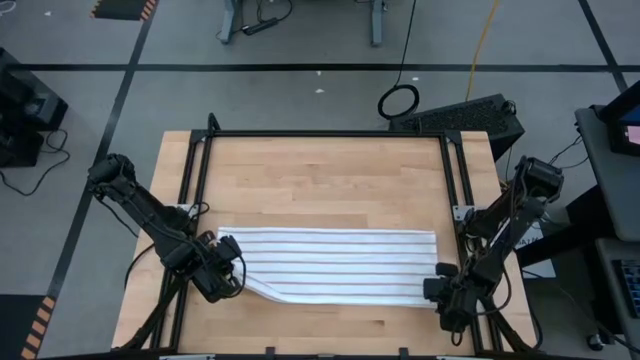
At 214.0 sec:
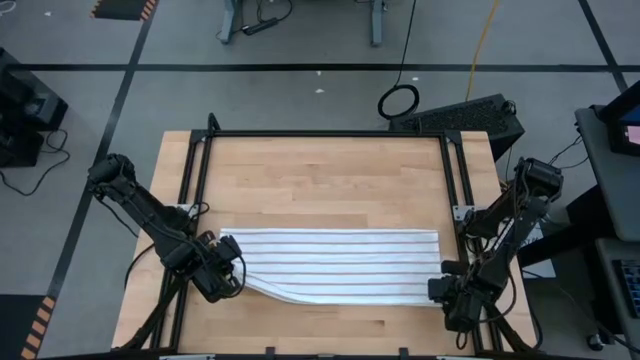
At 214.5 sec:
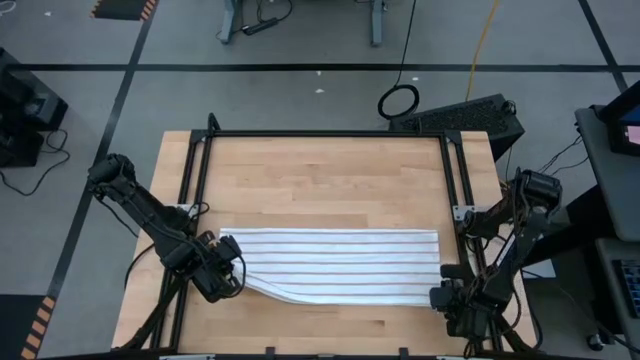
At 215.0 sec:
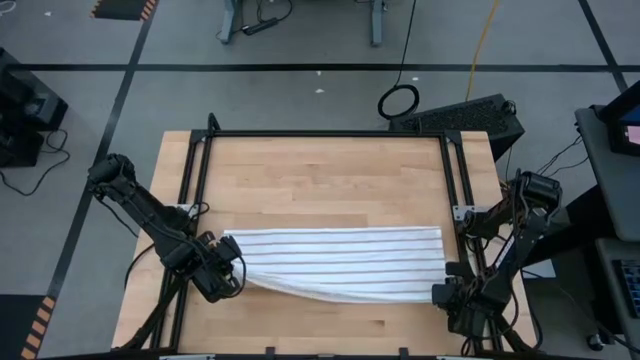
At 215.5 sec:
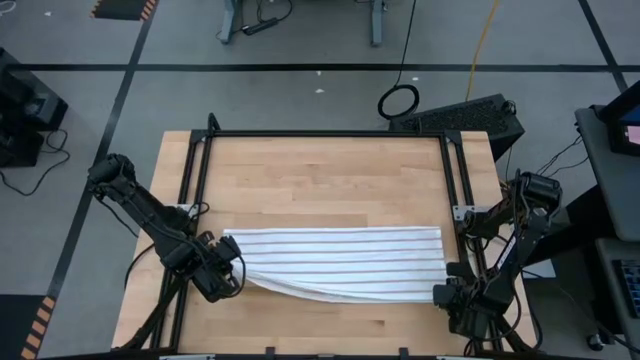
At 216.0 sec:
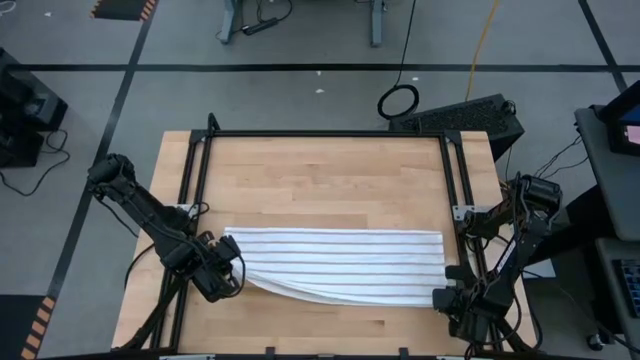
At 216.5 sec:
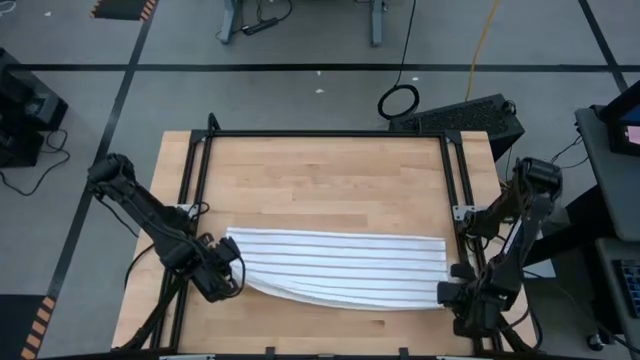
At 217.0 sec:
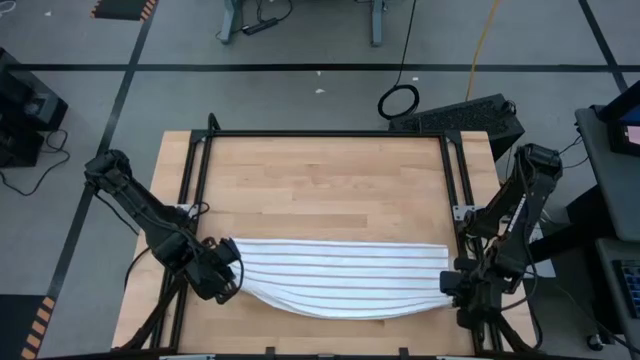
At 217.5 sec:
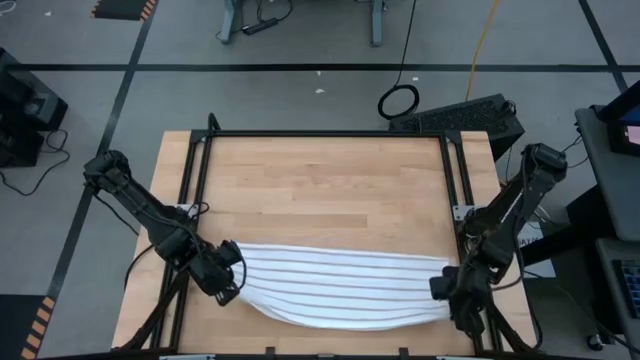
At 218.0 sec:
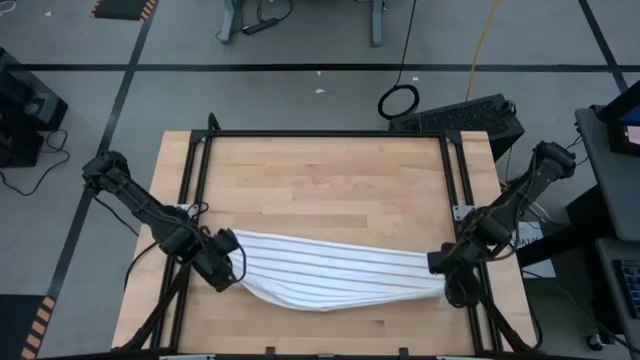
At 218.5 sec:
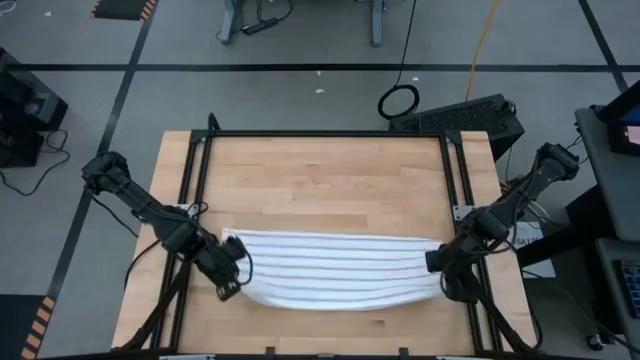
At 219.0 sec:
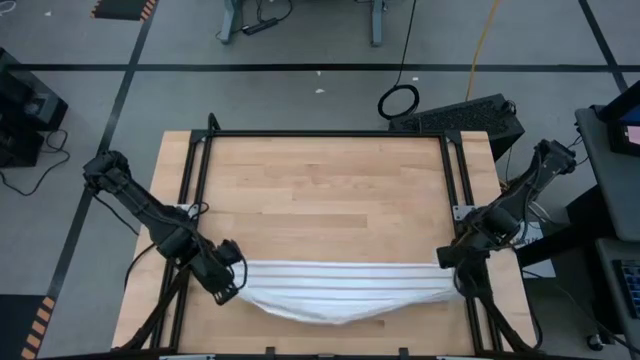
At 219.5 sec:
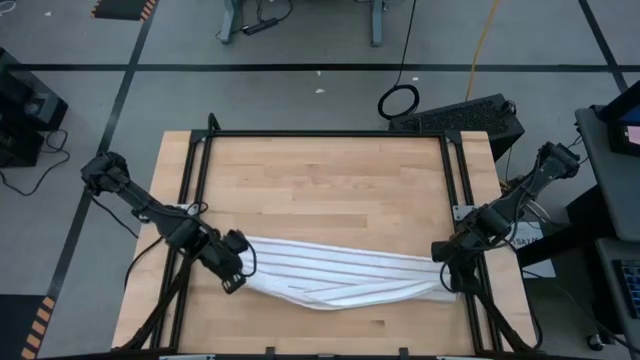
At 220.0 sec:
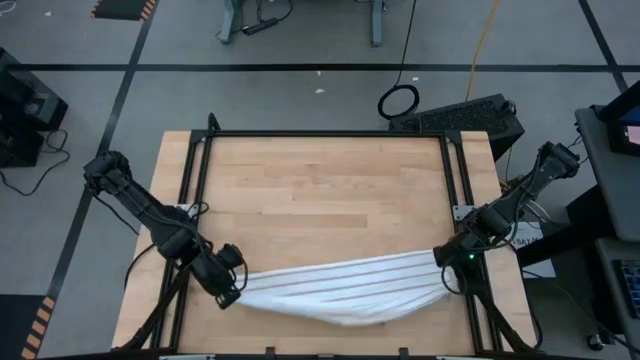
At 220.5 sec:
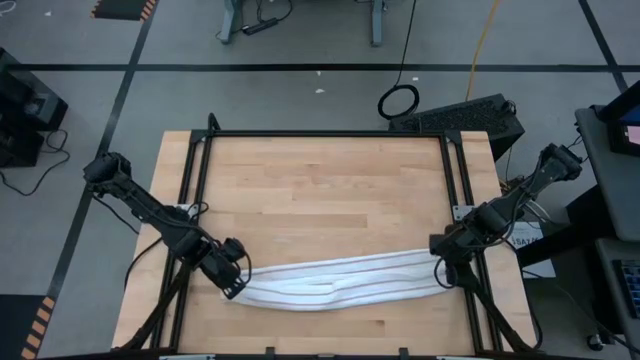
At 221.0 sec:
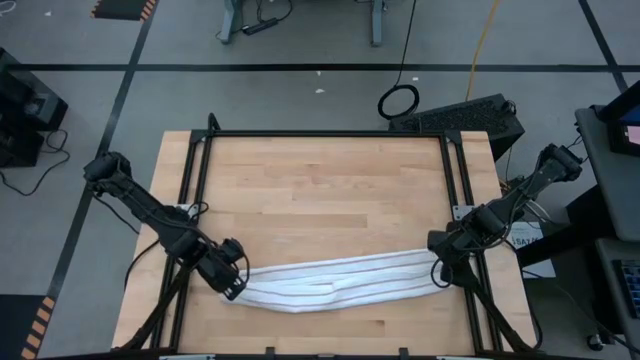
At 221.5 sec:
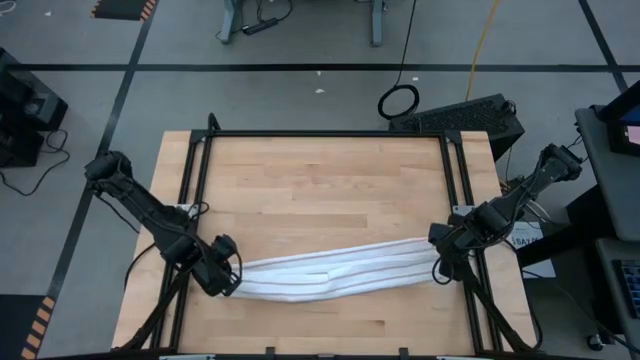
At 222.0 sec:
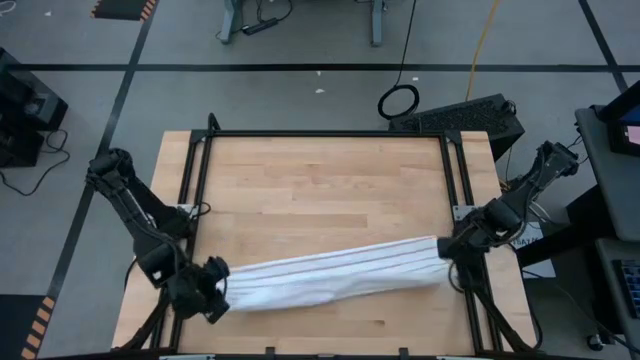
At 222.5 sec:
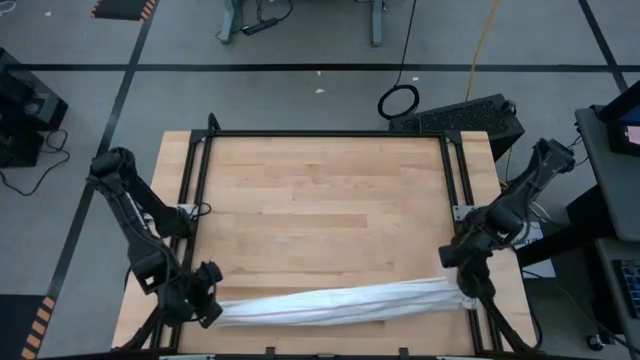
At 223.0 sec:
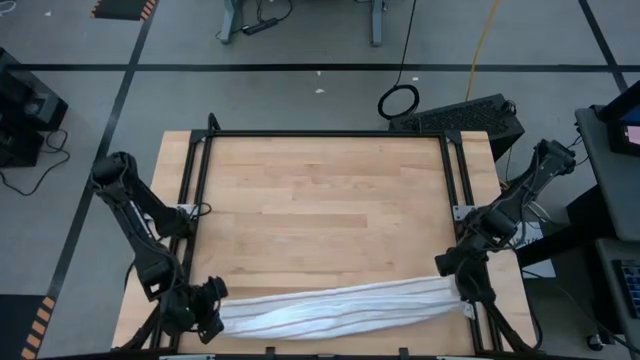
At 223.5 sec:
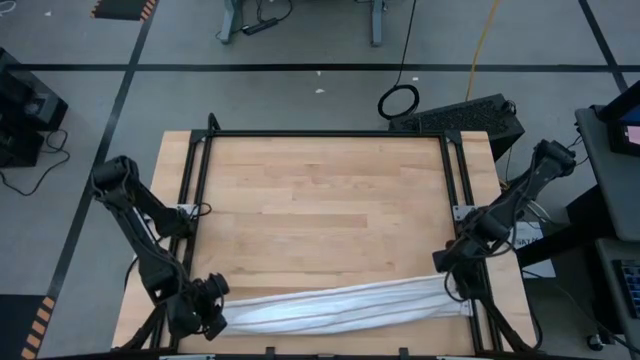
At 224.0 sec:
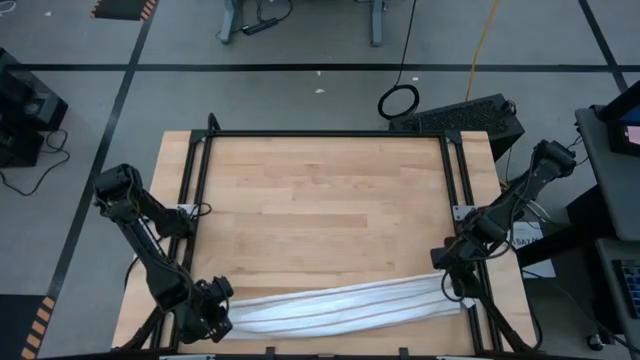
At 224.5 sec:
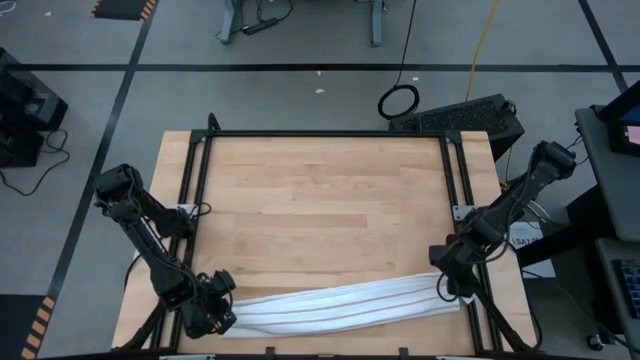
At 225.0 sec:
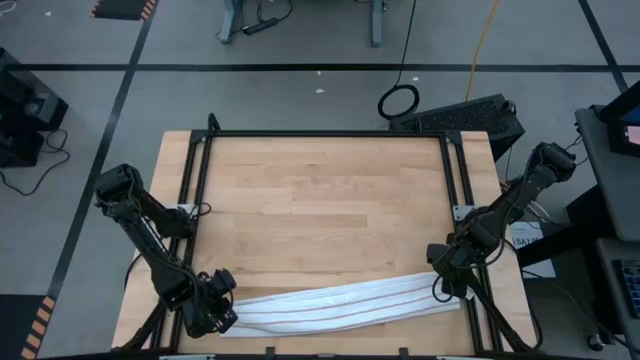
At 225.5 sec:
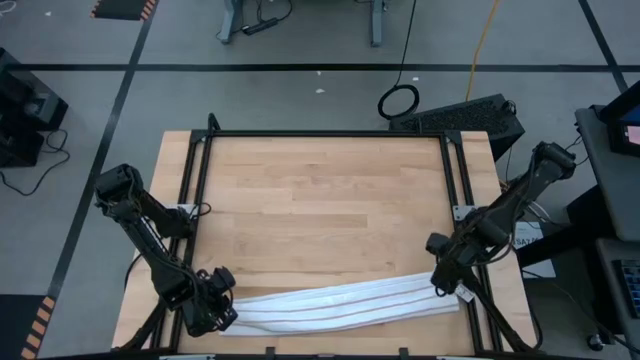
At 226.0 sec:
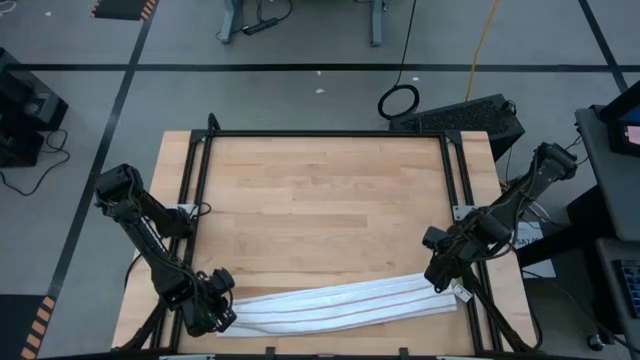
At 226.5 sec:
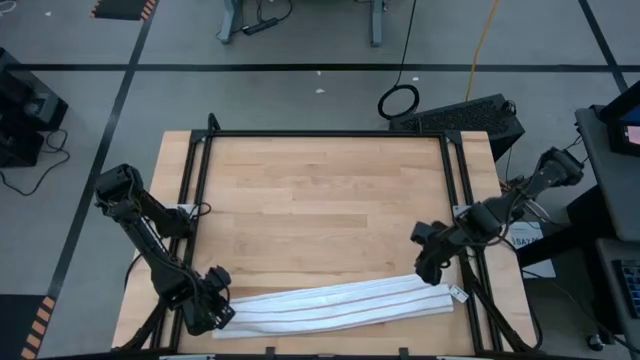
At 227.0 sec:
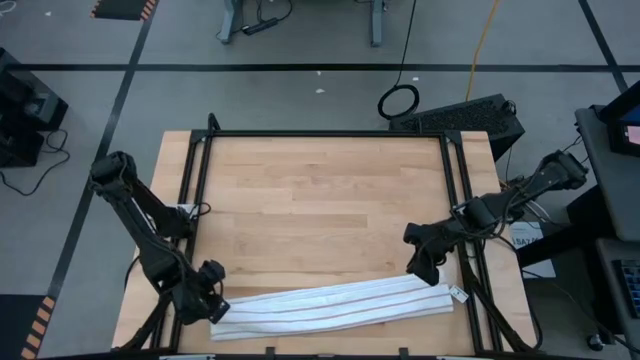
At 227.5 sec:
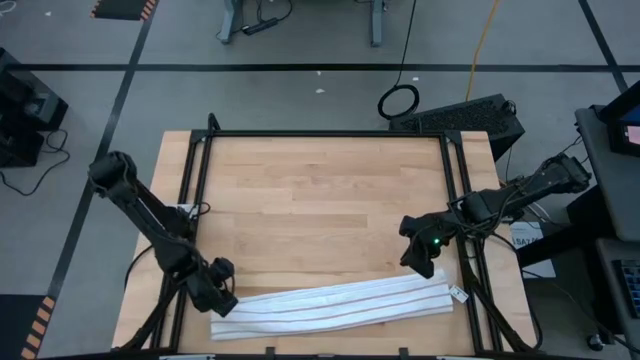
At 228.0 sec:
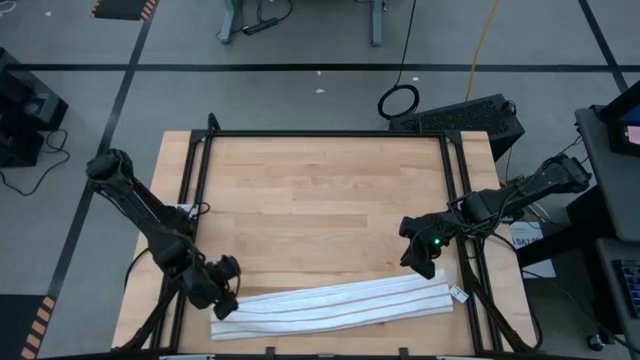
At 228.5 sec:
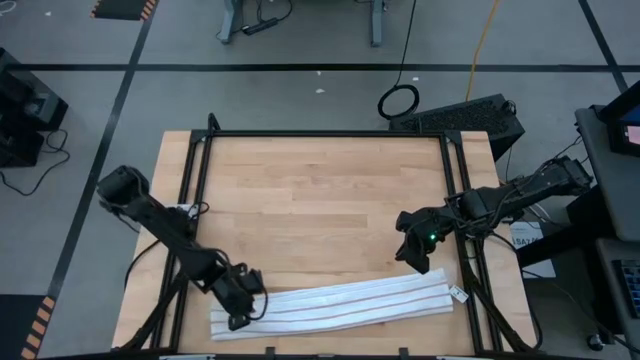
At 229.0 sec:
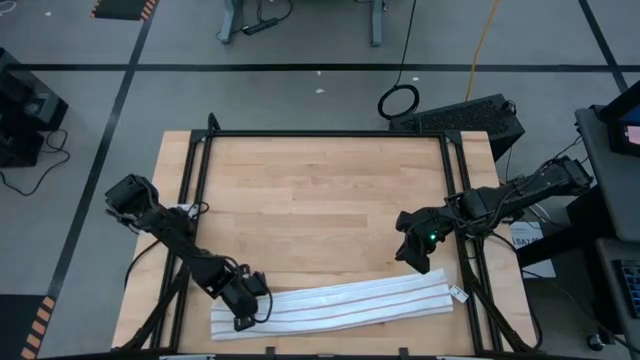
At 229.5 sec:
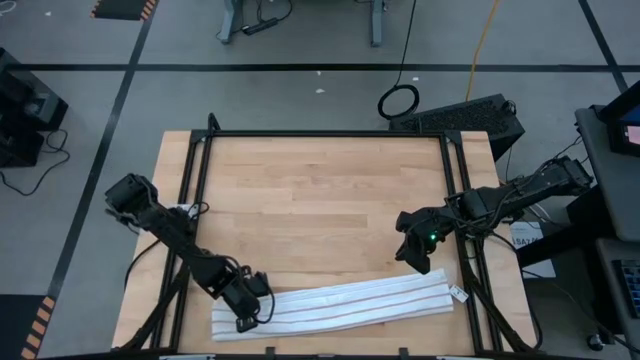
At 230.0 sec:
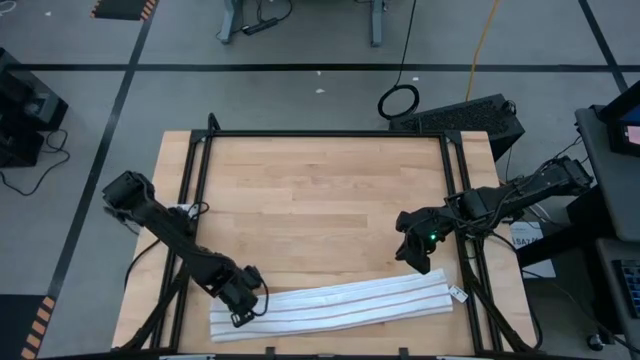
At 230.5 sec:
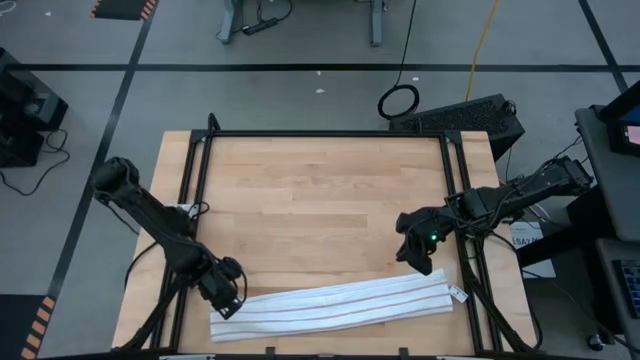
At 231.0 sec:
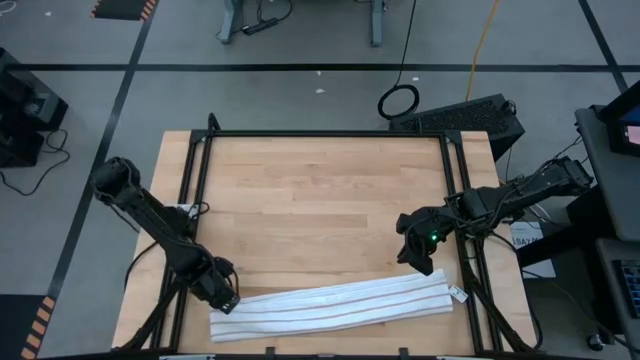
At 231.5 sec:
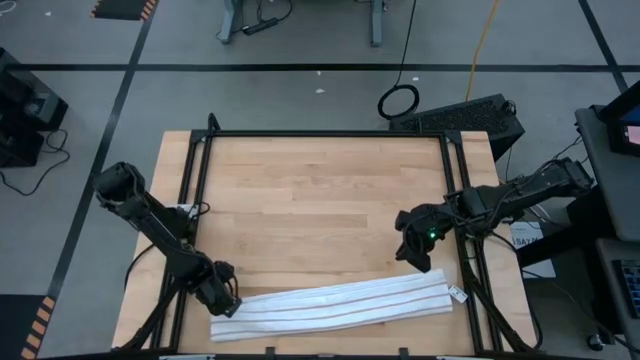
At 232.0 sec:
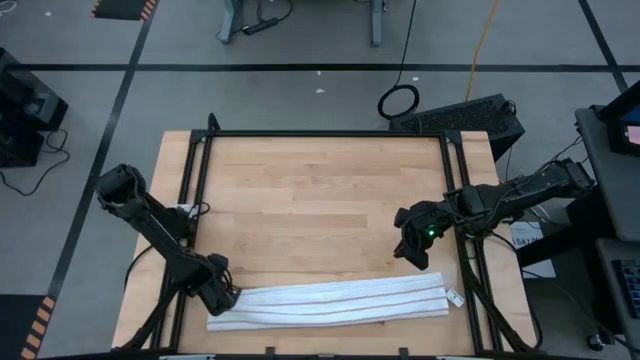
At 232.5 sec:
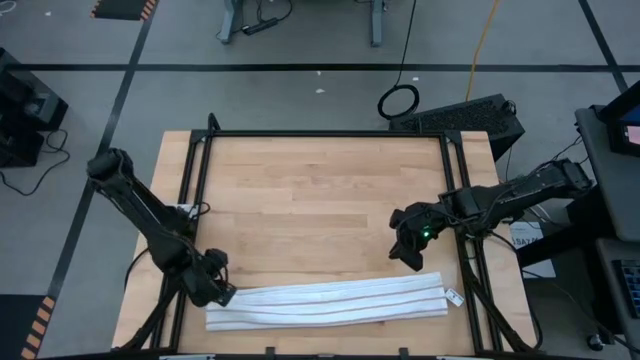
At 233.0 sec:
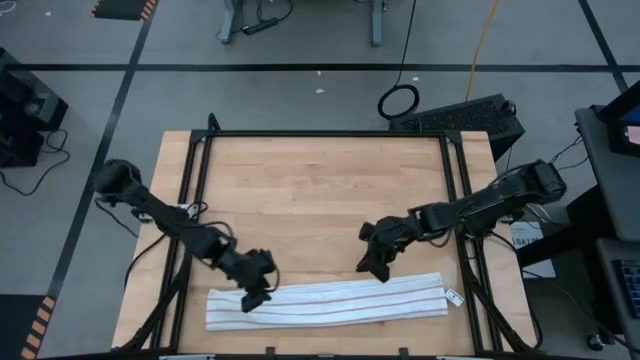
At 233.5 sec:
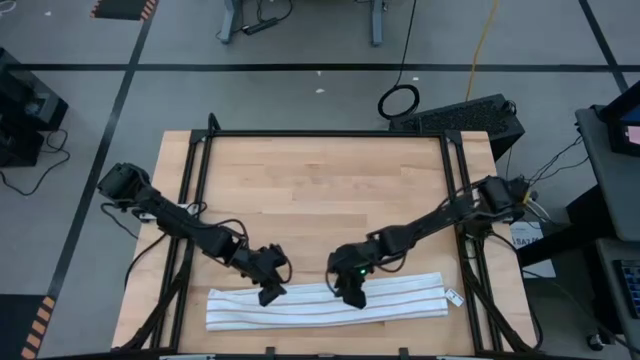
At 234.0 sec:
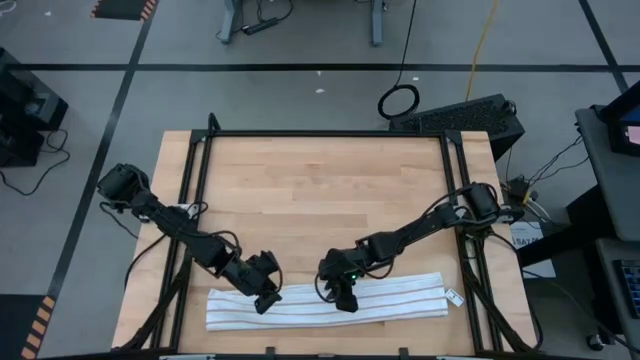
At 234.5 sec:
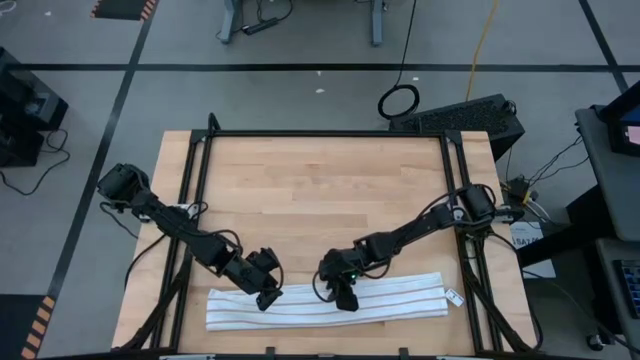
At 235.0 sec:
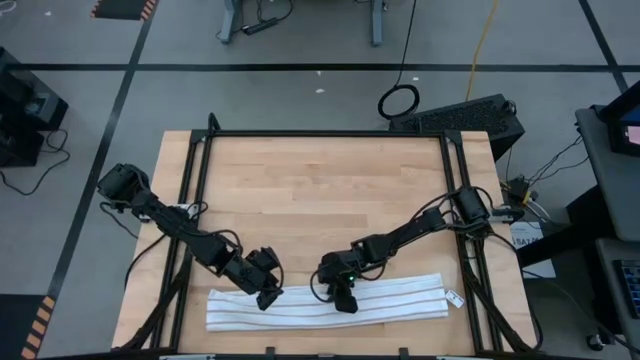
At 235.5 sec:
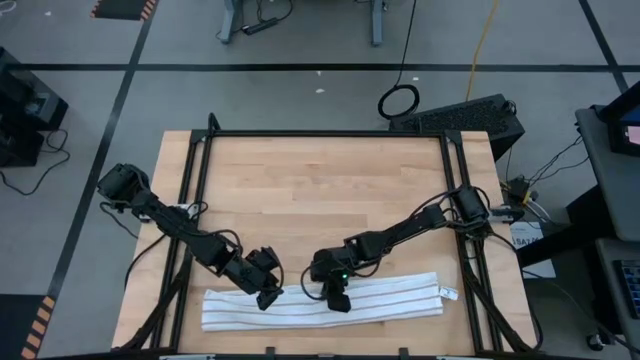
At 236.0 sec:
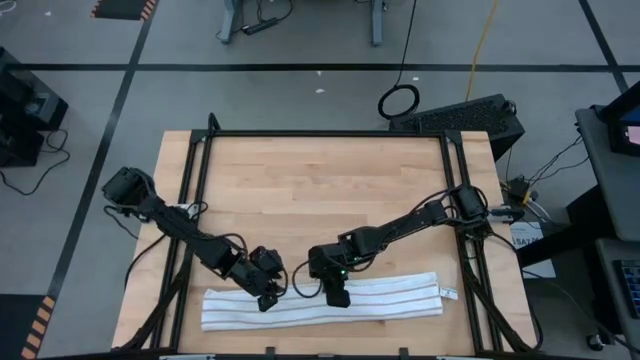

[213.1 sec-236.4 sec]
Task: Roll towel into tight, uniform cylinder
Fold the white brown kitchen towel
